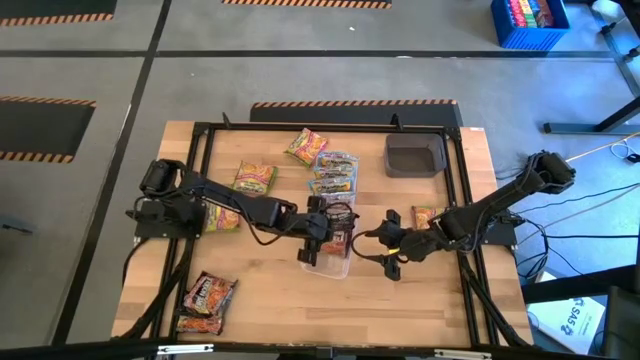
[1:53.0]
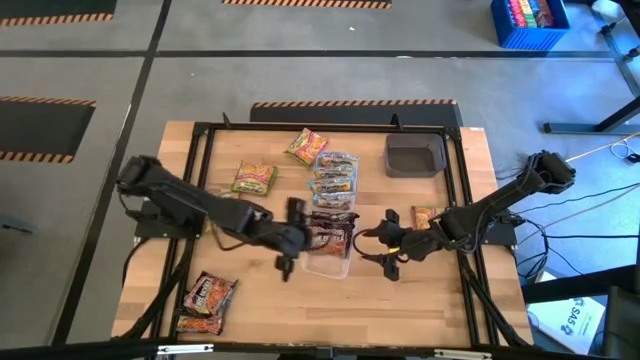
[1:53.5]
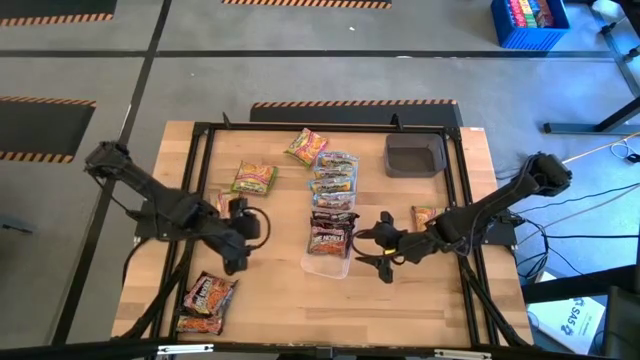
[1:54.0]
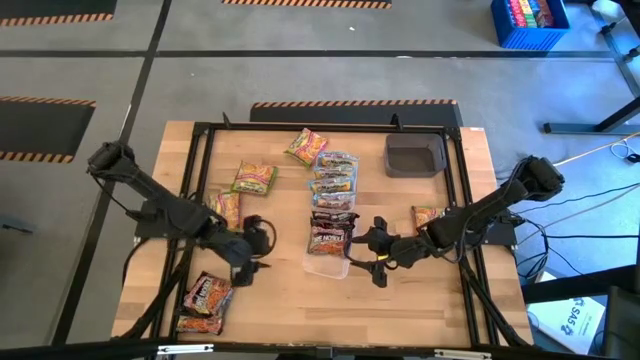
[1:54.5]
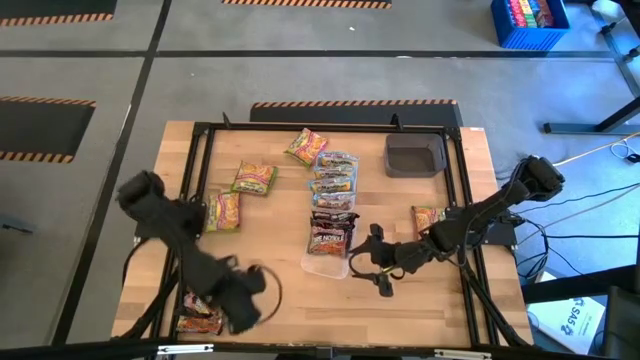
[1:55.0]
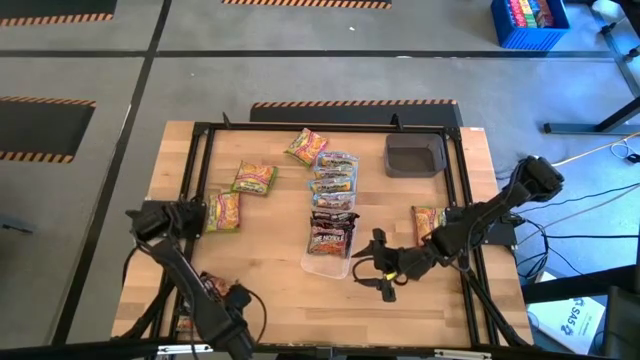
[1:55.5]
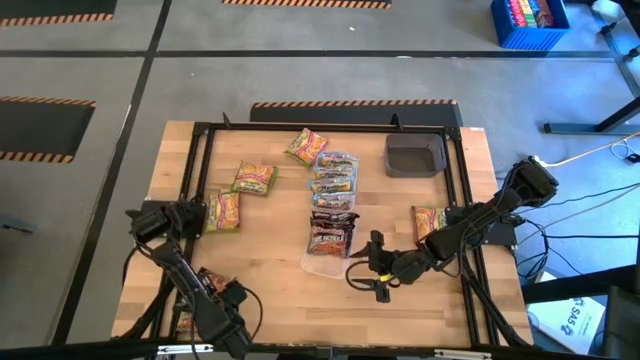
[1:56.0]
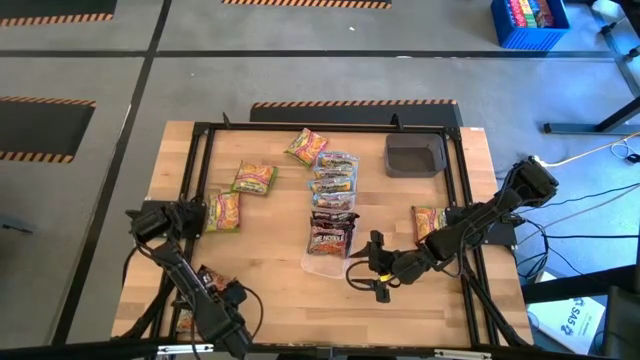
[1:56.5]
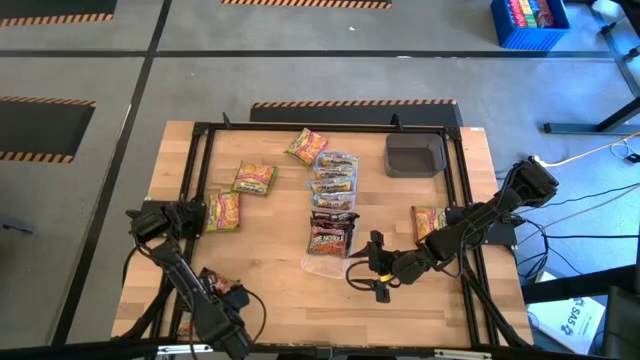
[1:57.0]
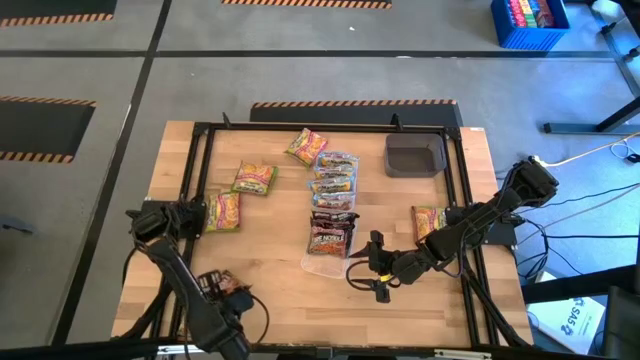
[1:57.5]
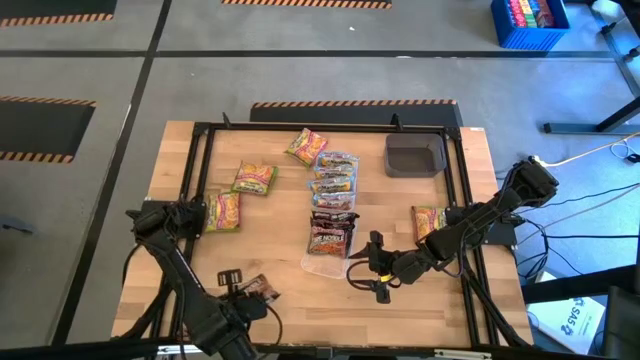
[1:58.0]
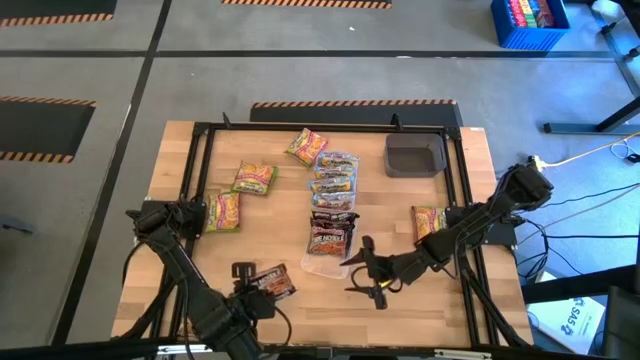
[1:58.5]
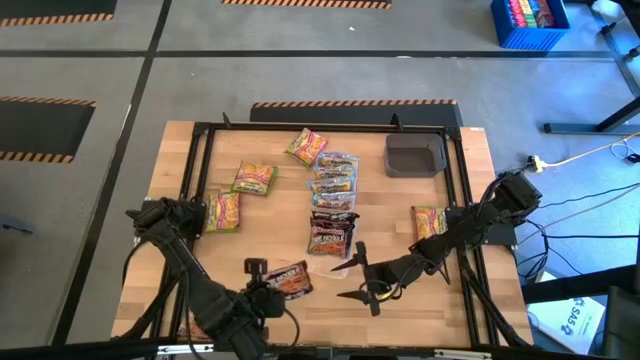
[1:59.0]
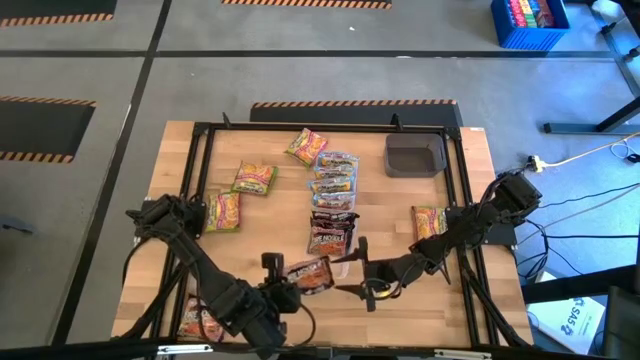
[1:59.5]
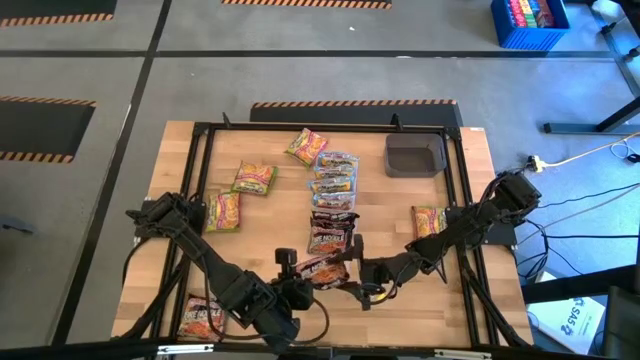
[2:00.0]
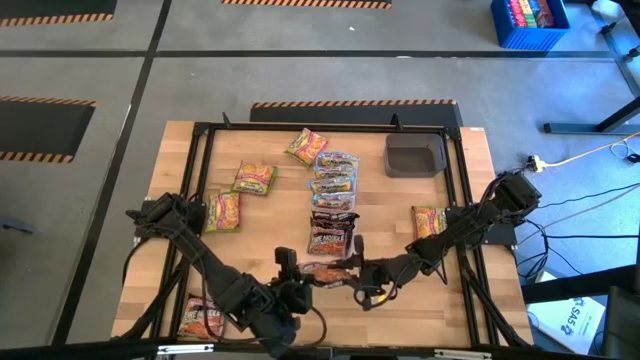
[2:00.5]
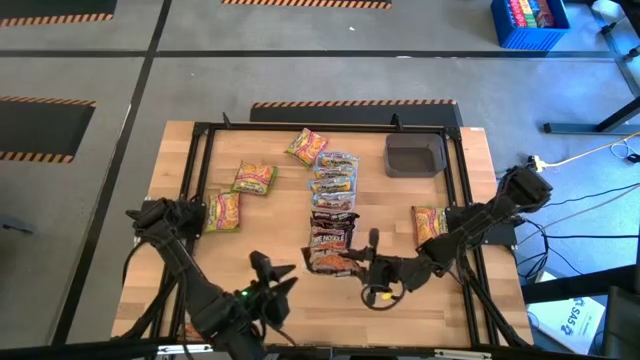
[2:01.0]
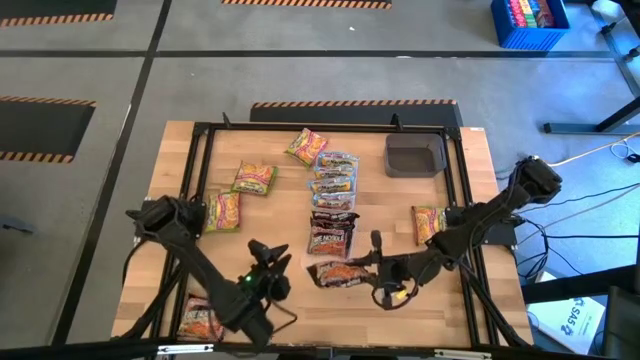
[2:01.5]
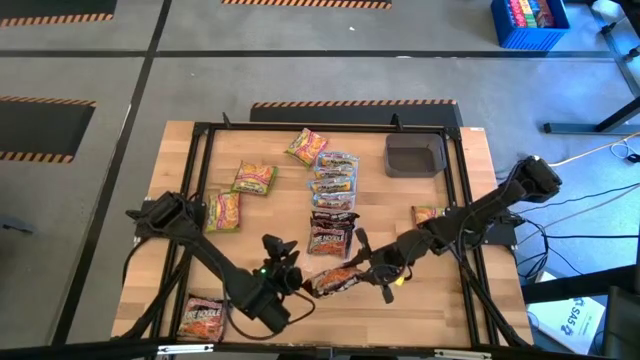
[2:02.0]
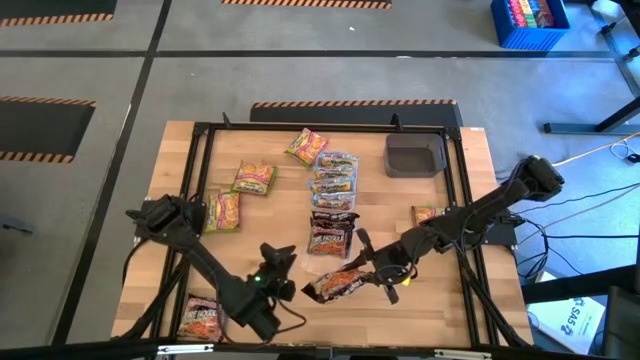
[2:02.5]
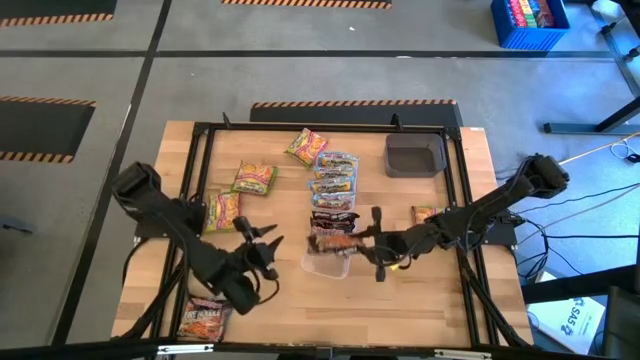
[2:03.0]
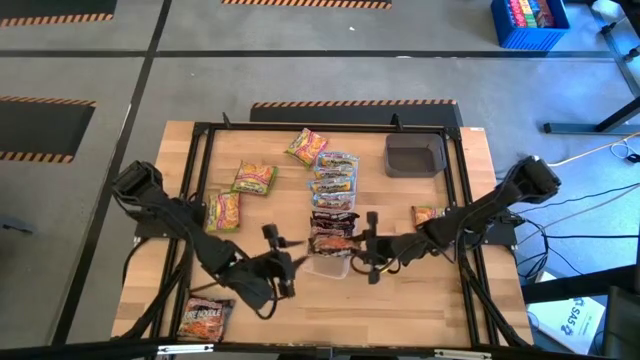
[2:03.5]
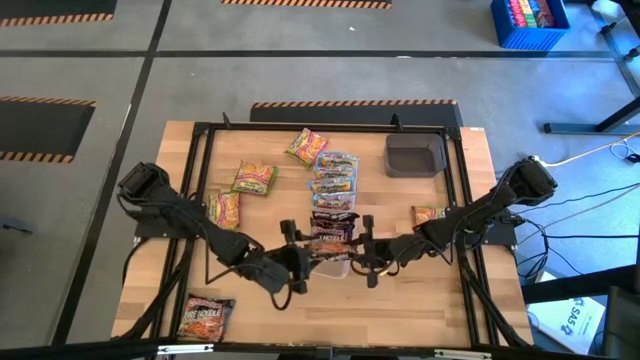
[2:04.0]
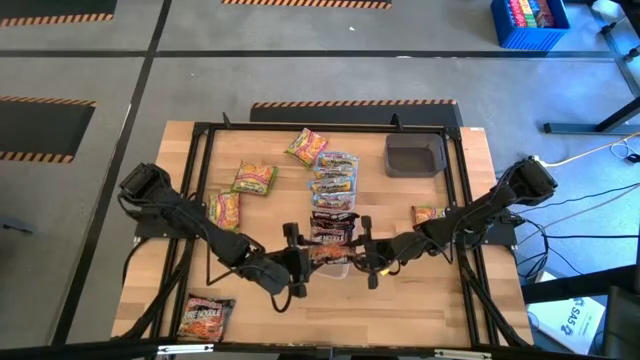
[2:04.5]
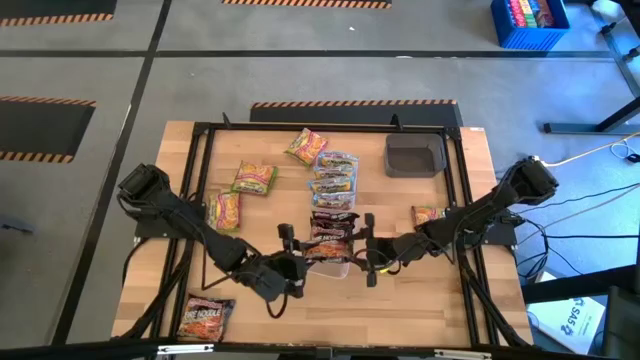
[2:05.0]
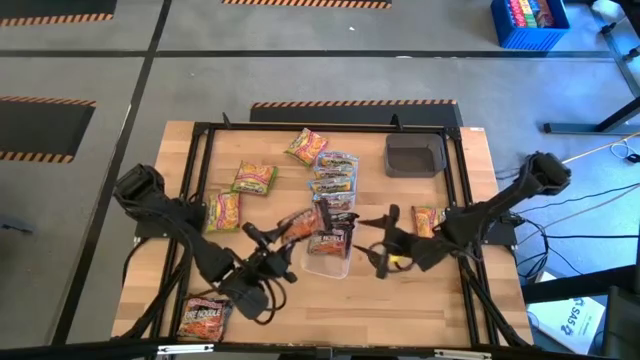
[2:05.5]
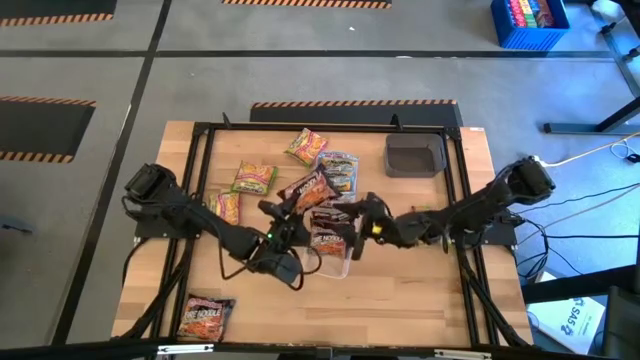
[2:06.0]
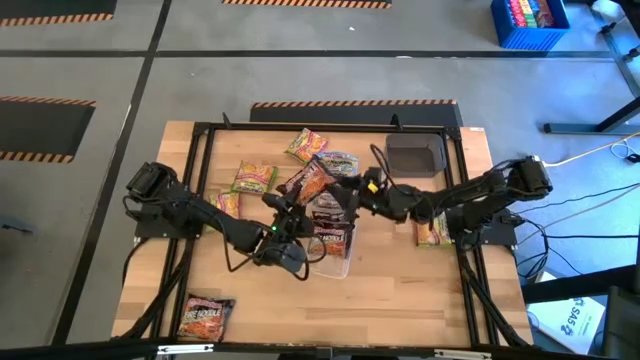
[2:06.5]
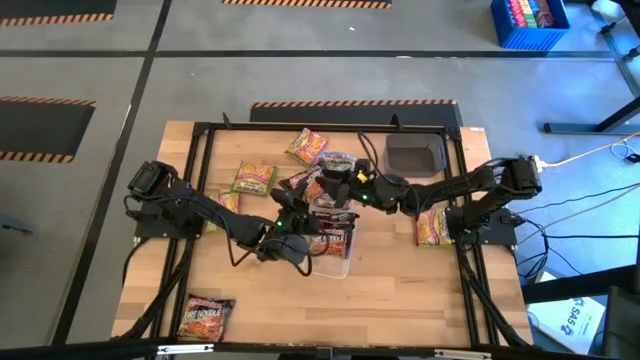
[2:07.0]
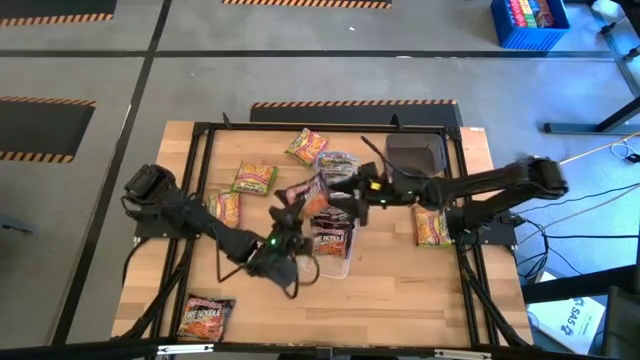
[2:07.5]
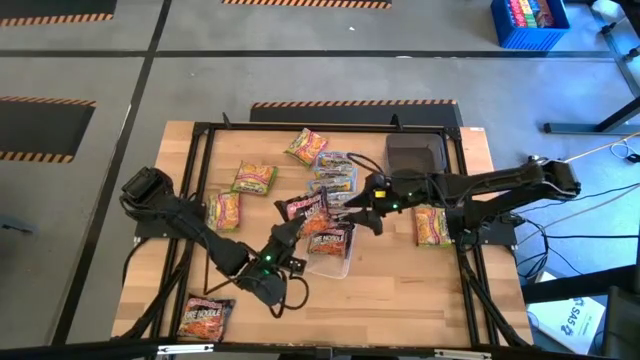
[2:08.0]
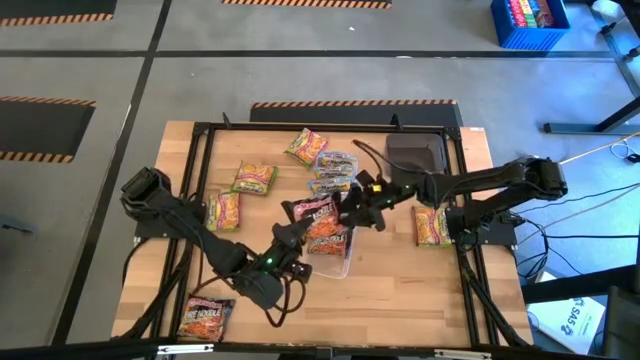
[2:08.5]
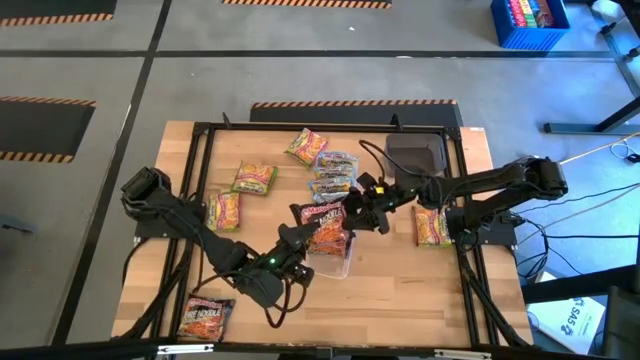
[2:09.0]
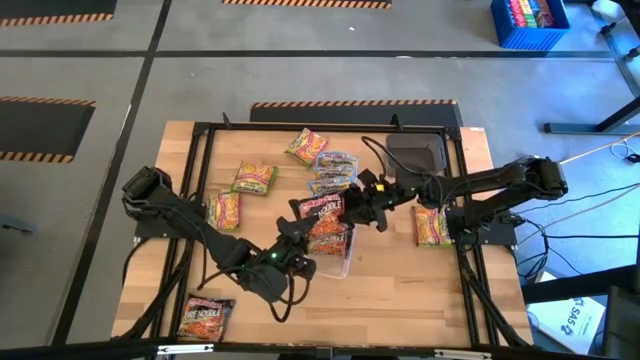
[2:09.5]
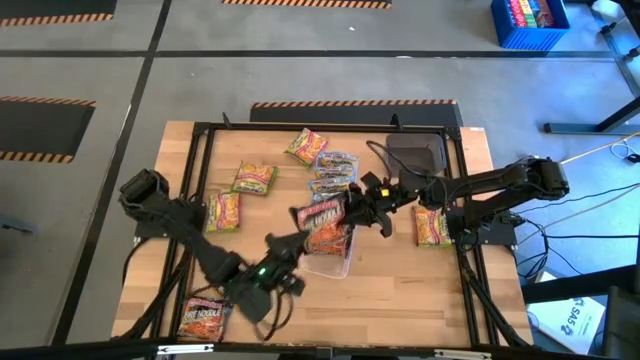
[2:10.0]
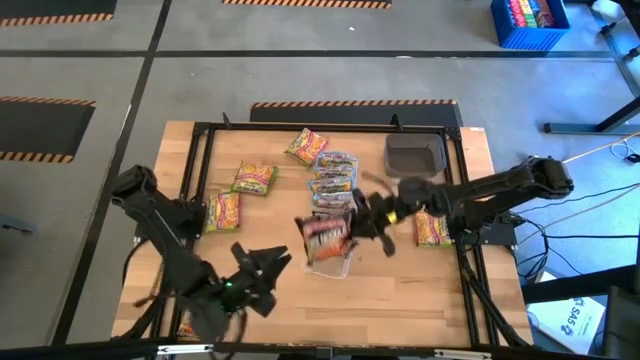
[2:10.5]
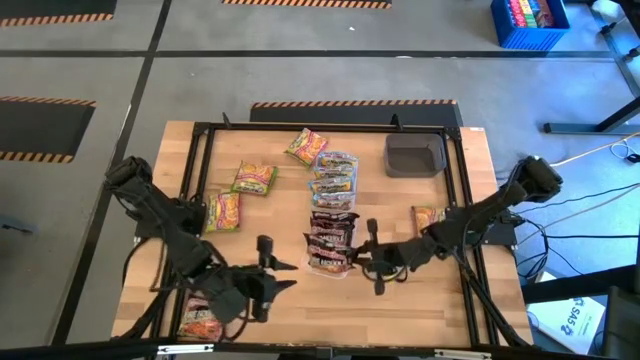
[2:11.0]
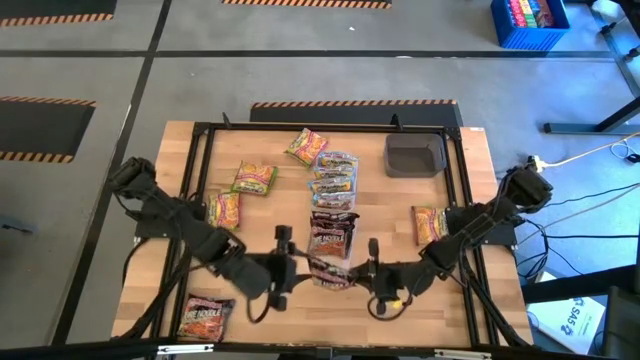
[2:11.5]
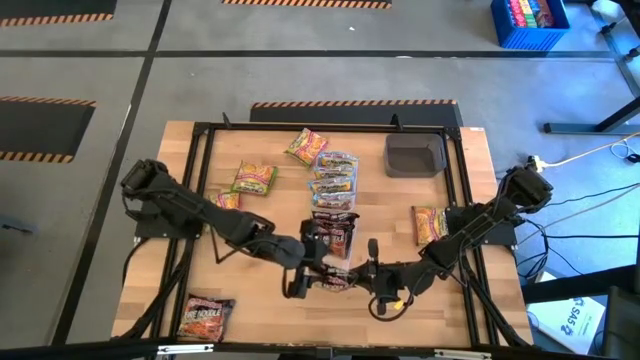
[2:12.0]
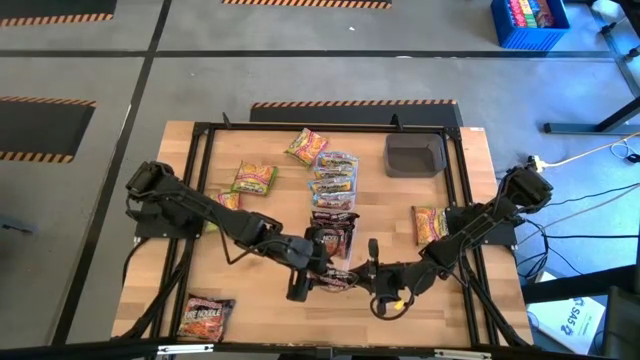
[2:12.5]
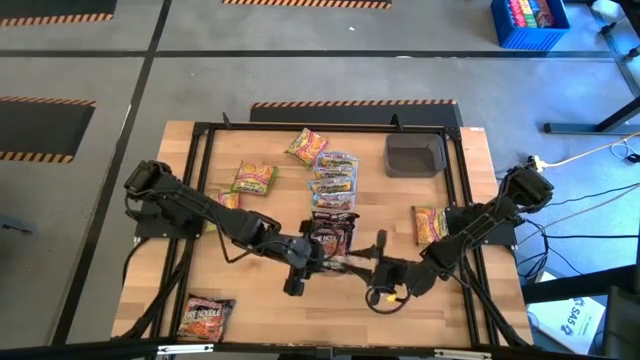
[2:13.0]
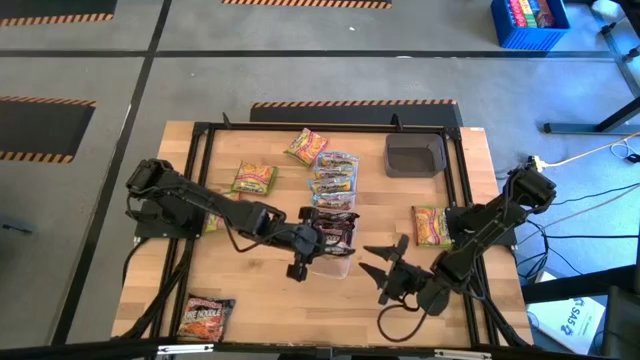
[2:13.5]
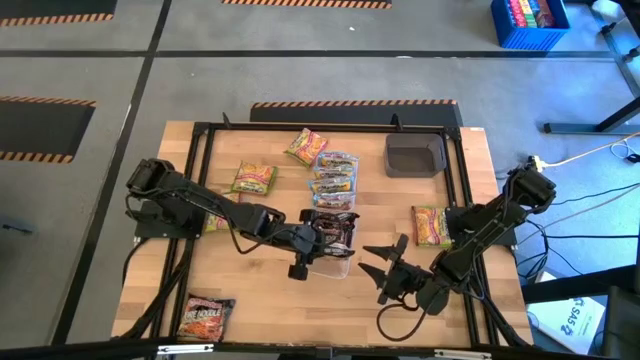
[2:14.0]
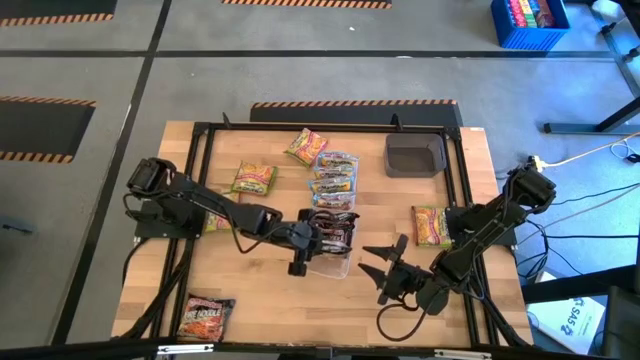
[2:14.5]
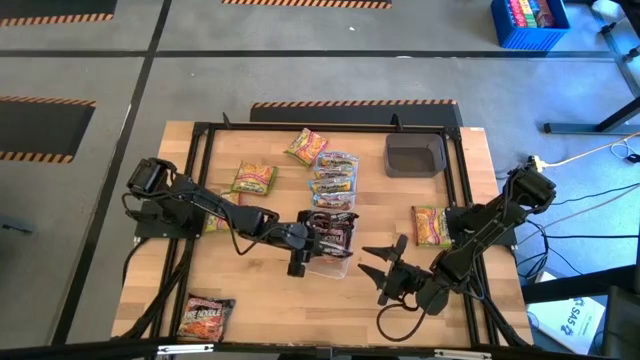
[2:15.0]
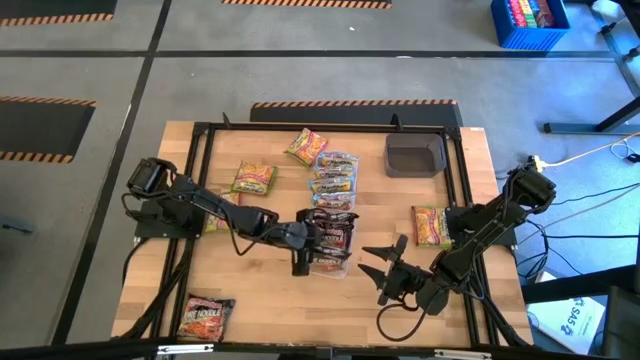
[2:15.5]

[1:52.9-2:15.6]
Task: Sort Maruchan noodles
Put the top black noodle pack into the bottom transparent bin
